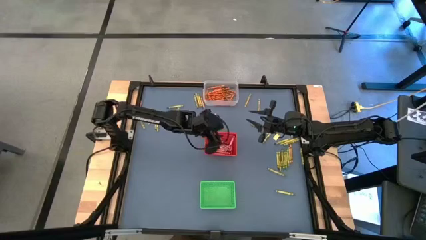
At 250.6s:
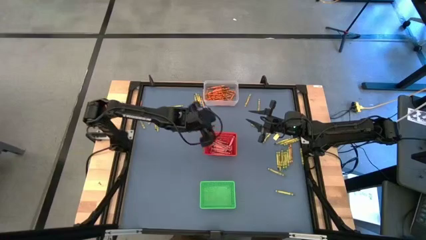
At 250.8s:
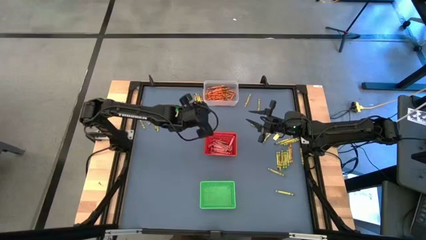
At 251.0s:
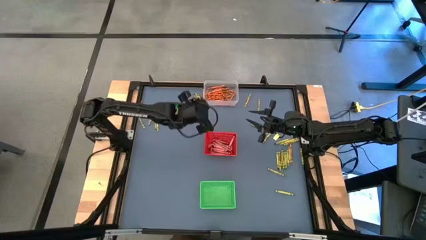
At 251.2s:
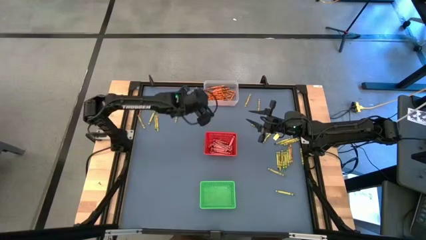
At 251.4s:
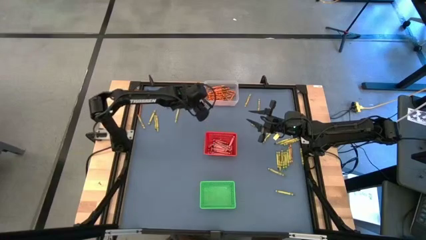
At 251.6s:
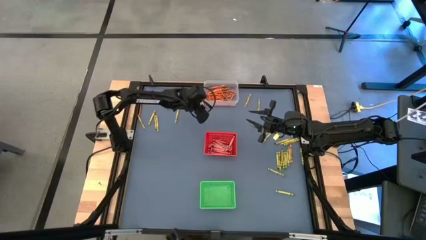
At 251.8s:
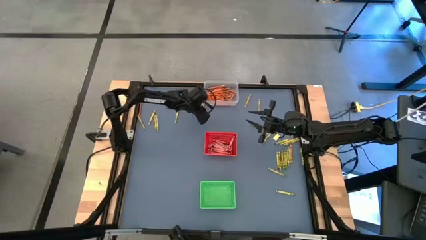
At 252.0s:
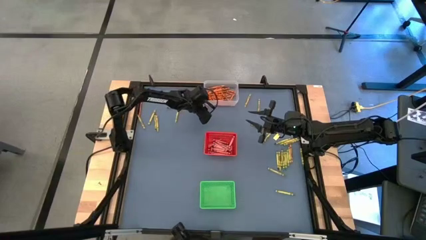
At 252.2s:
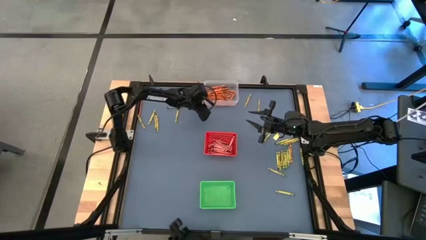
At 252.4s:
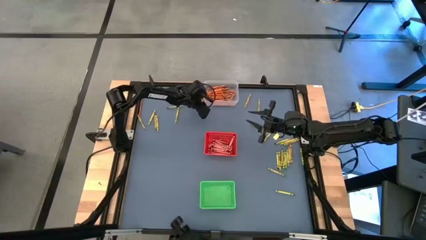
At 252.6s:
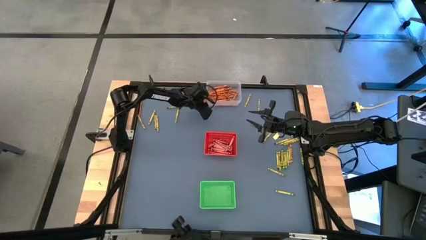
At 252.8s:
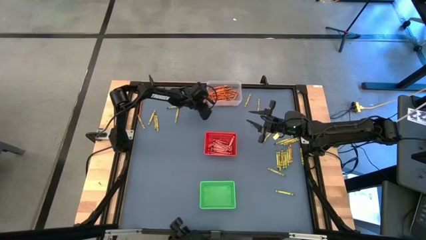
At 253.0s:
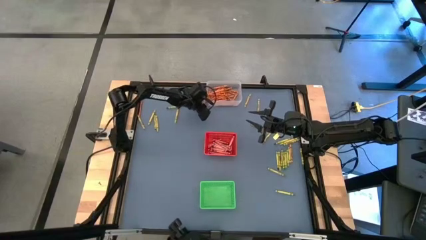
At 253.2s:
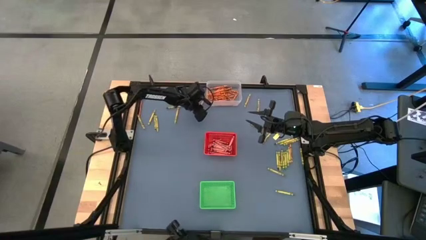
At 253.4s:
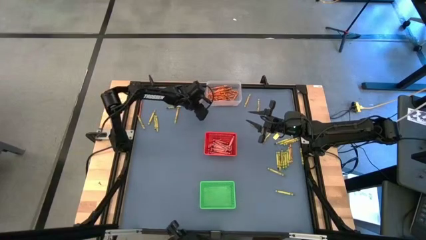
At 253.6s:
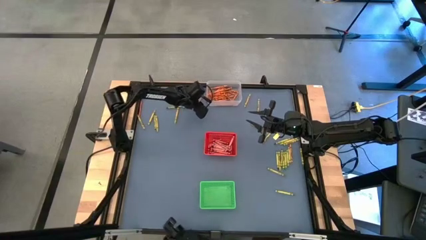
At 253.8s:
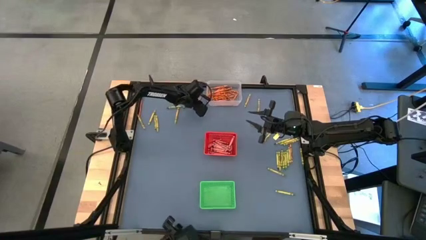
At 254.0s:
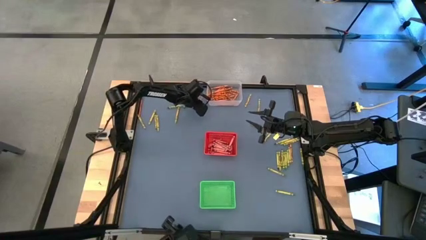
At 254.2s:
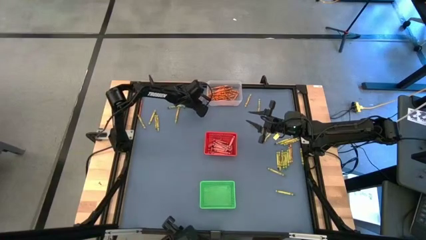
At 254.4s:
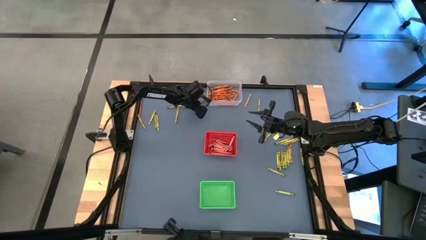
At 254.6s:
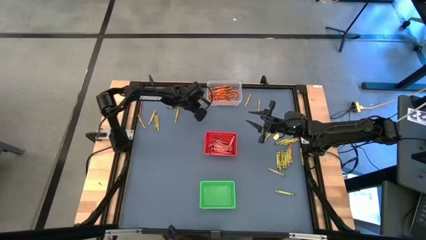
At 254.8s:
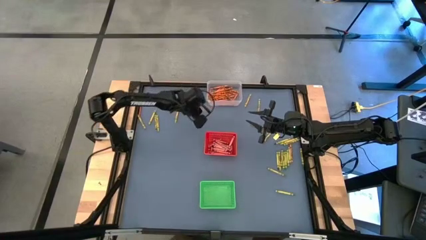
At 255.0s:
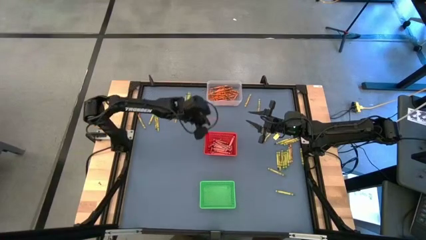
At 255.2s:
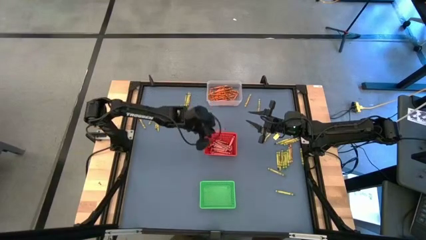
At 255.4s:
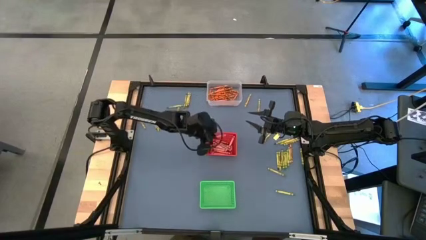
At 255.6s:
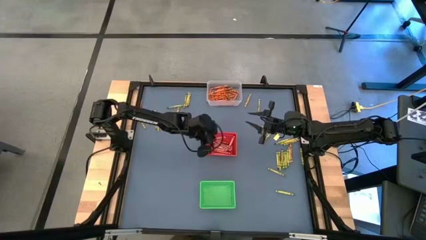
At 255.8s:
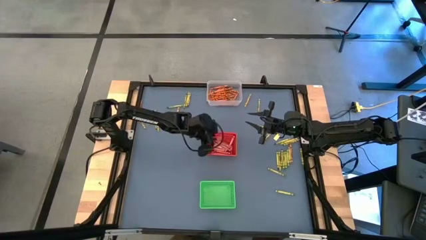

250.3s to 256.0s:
Task: Sort crayons
Put the red crayon into the red bin

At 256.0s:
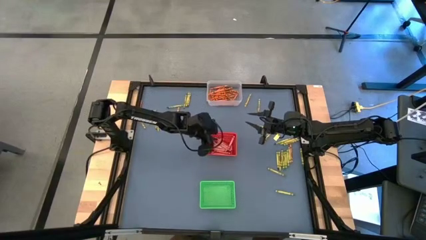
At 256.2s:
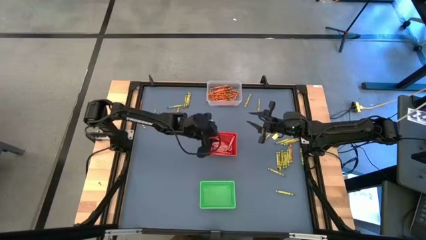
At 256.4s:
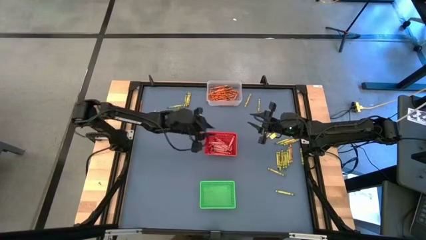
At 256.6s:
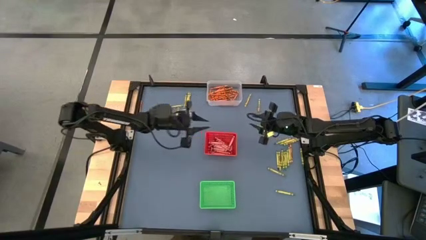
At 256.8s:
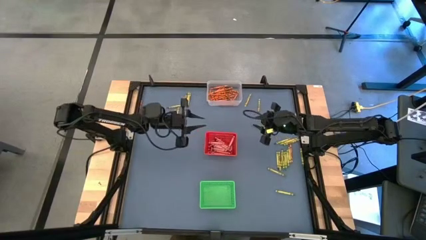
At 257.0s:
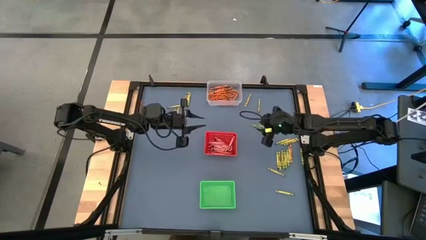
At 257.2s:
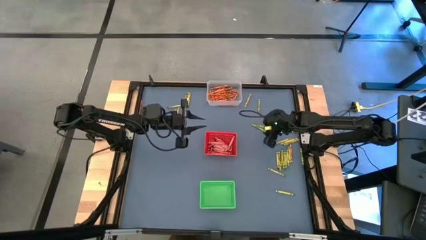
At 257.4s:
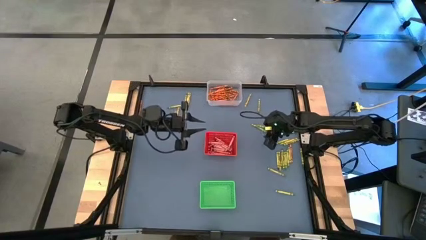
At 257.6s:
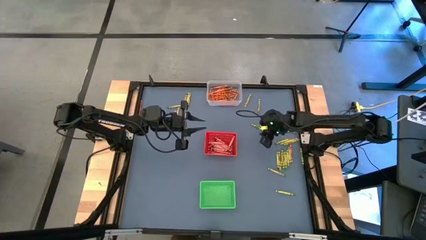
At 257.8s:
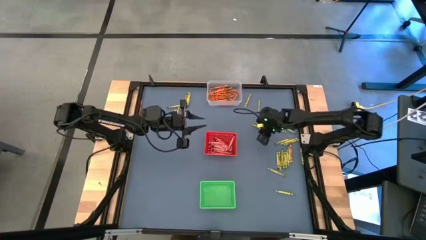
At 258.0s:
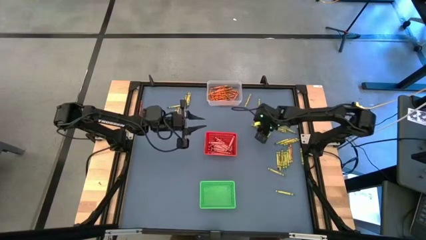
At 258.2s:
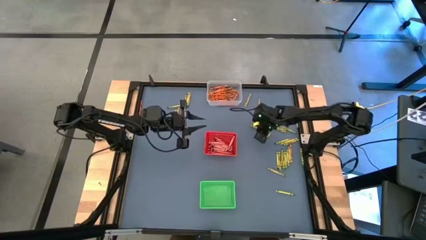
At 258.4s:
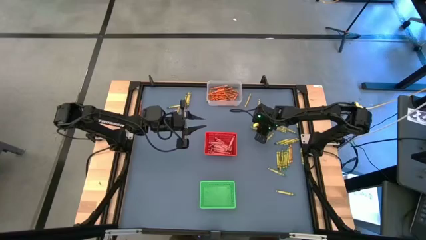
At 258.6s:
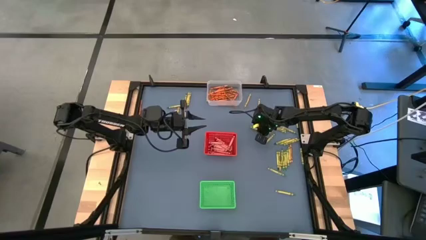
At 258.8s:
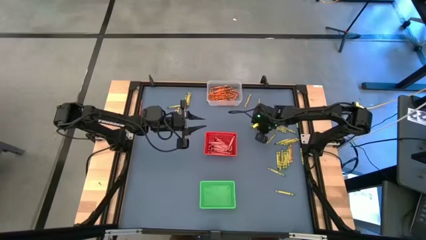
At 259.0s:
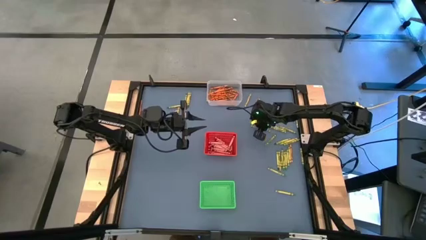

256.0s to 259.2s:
Put the green crayon into the green bin

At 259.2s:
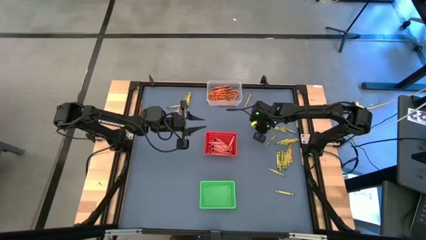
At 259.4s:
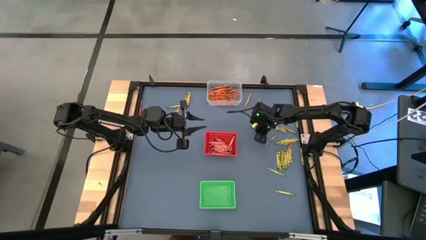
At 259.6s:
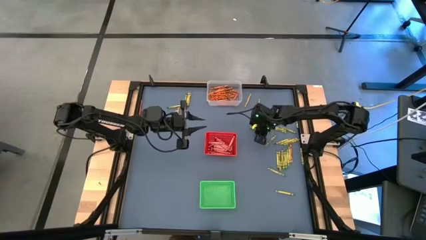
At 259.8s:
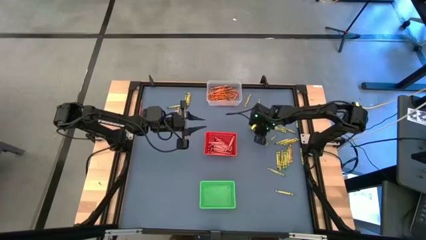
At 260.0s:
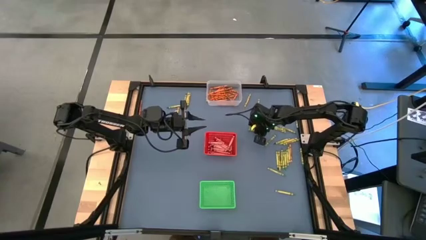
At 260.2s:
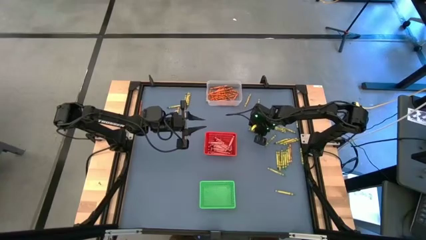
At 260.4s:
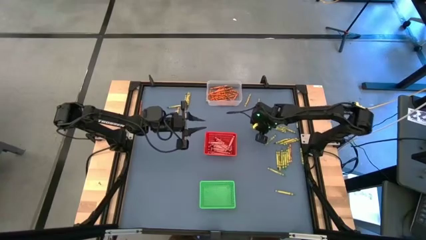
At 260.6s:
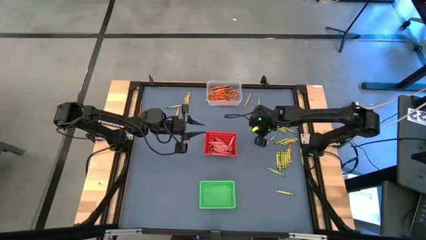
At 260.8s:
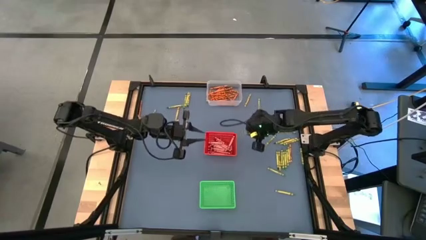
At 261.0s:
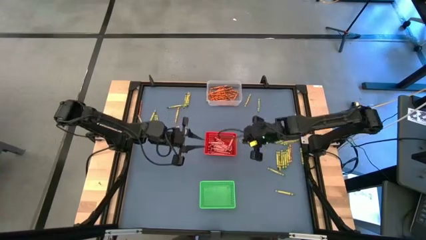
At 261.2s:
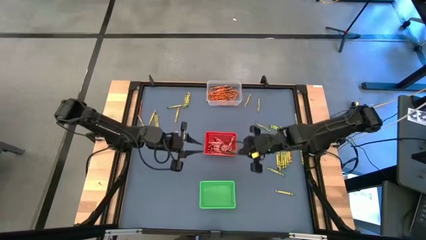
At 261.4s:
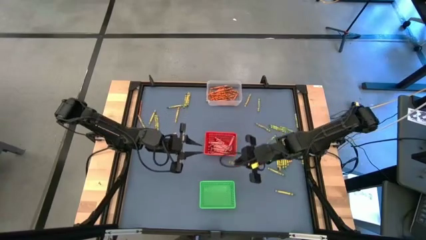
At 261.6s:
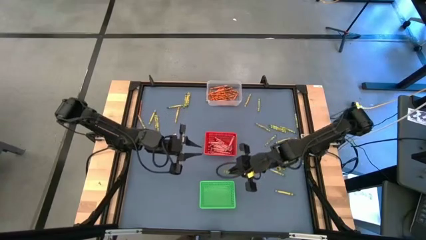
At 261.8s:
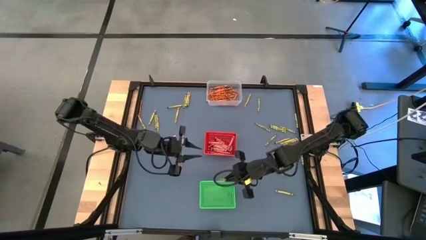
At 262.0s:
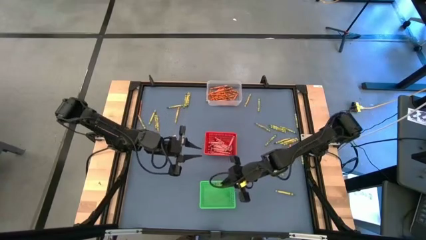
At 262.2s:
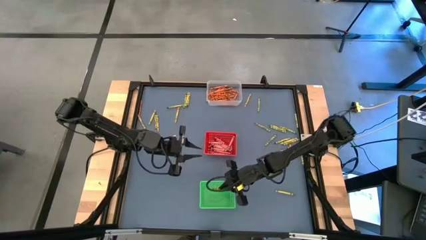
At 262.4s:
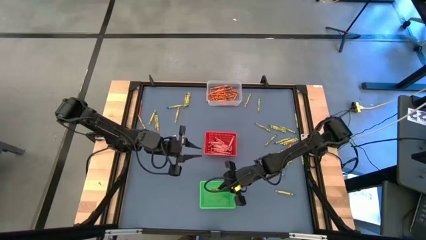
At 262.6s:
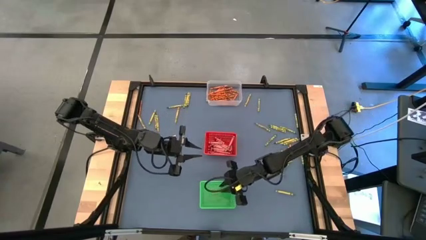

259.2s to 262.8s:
Put the green crayon into the green bin

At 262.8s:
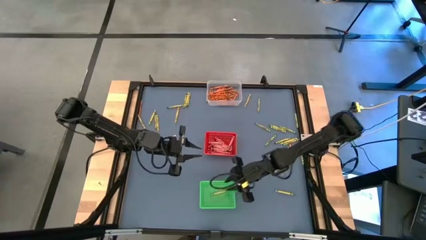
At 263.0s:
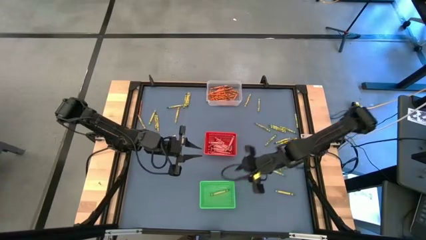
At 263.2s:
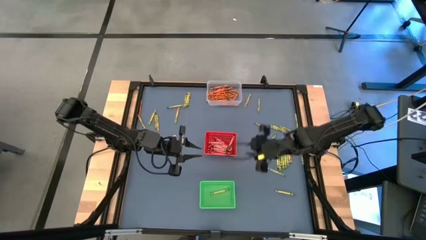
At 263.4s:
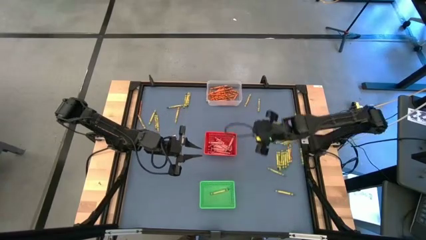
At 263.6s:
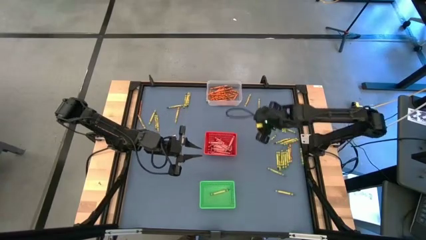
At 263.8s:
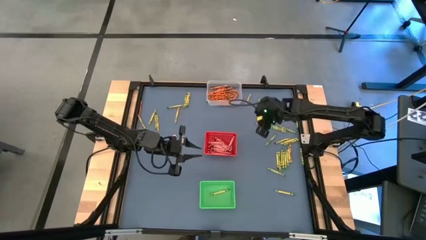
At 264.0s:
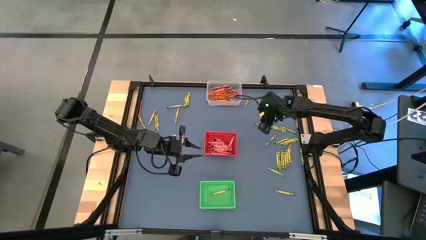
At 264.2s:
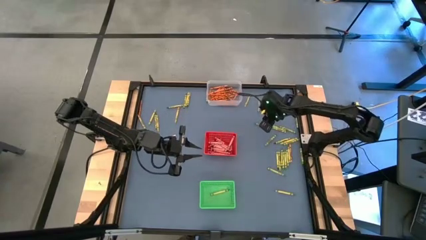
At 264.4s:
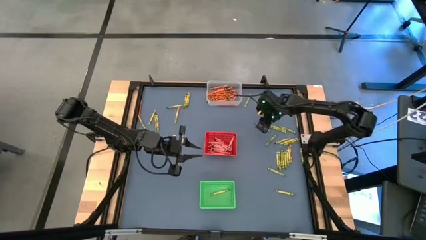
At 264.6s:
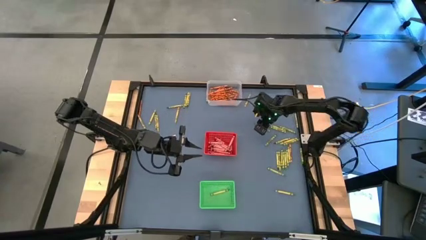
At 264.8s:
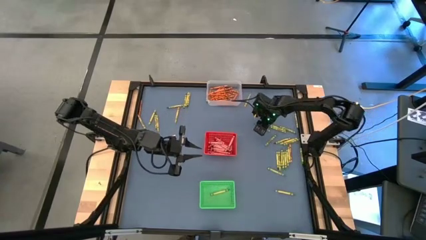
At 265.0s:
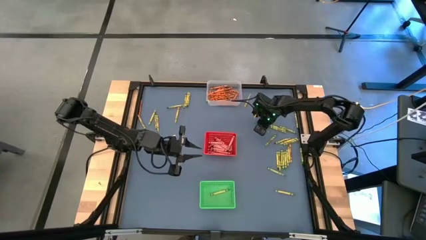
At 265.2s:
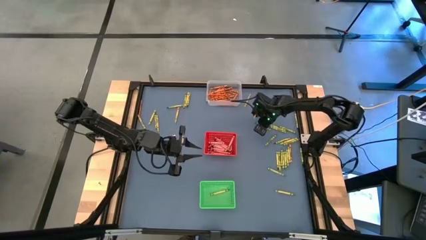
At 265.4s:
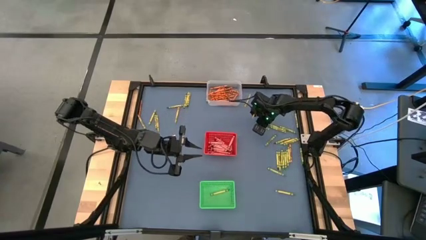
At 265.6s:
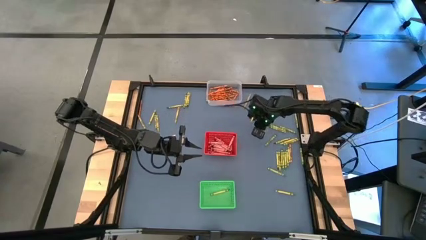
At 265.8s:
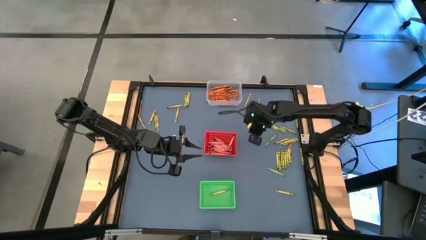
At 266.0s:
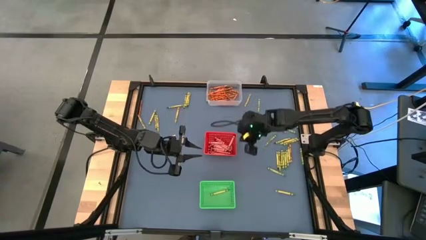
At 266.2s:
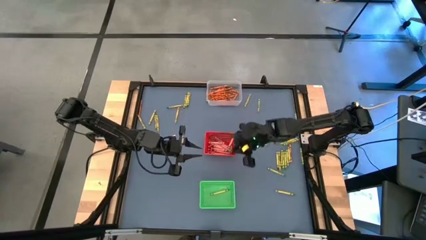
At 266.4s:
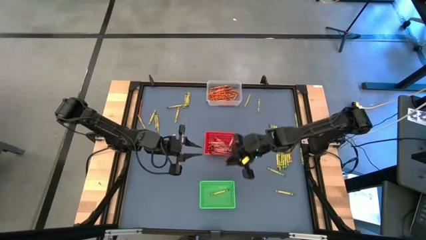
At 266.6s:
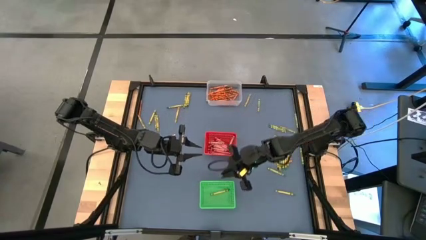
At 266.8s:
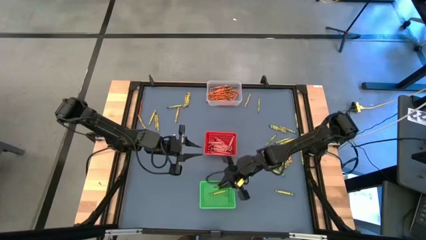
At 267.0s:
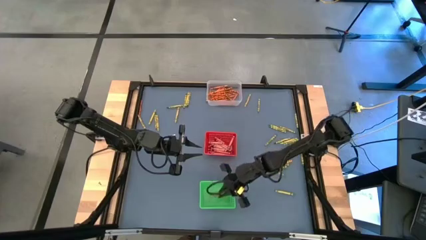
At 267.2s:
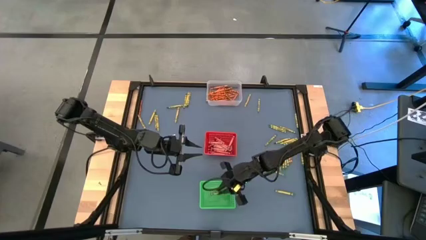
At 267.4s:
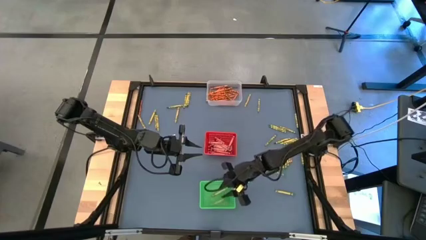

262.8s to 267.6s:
Put the green crayon into the green bin
